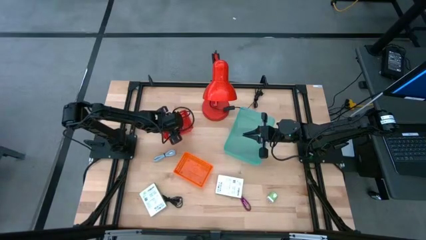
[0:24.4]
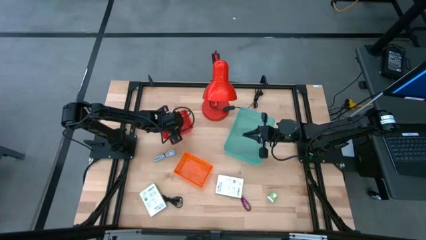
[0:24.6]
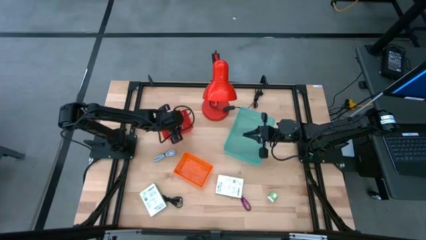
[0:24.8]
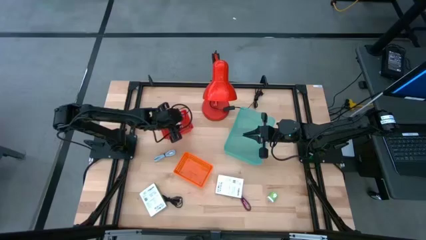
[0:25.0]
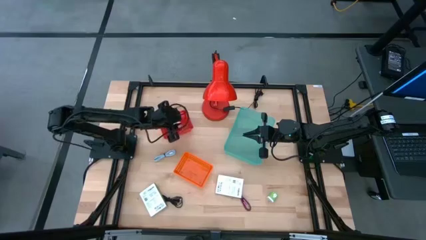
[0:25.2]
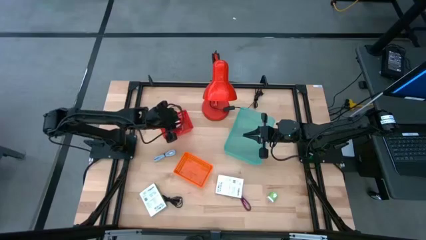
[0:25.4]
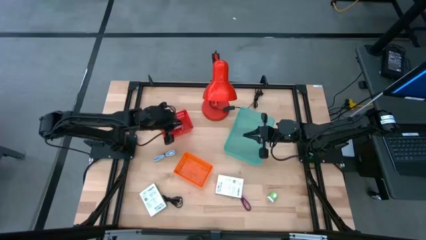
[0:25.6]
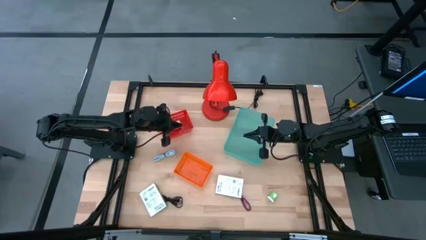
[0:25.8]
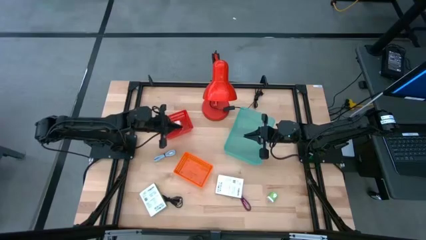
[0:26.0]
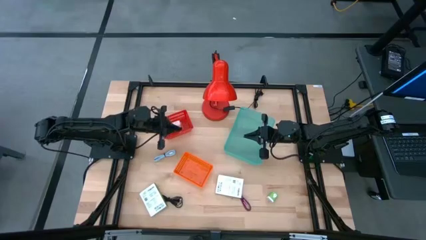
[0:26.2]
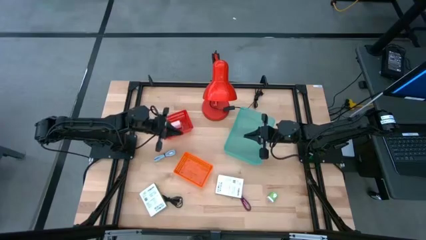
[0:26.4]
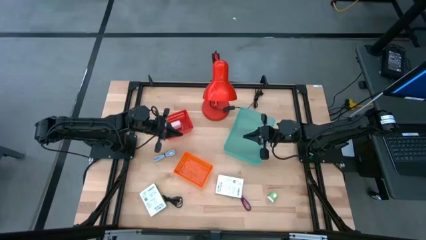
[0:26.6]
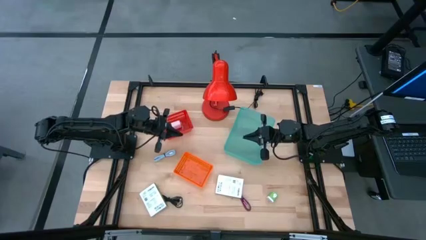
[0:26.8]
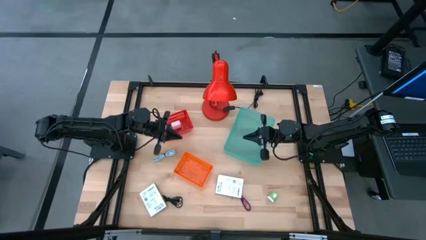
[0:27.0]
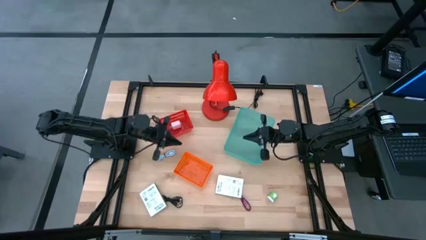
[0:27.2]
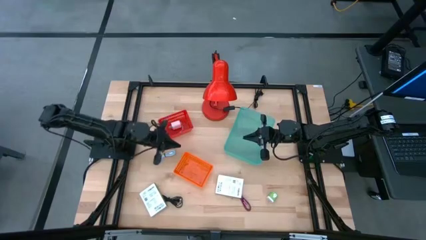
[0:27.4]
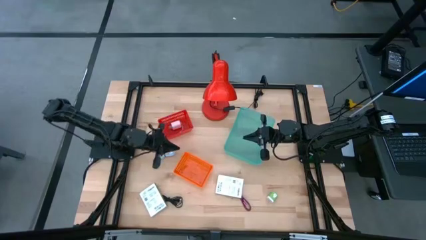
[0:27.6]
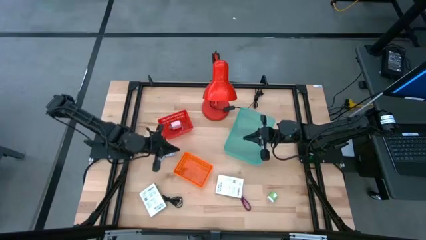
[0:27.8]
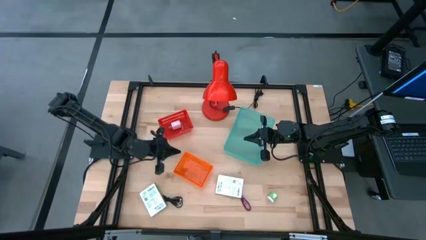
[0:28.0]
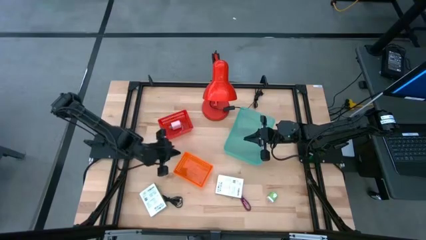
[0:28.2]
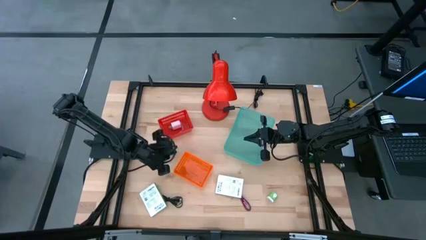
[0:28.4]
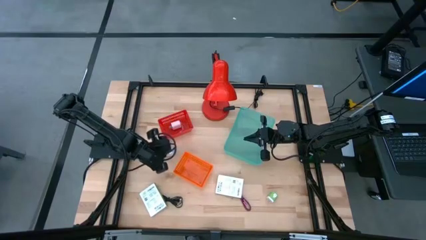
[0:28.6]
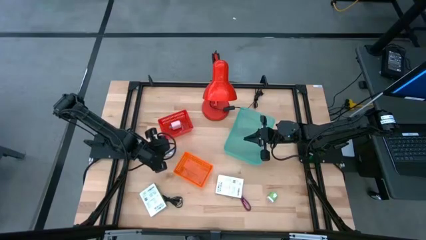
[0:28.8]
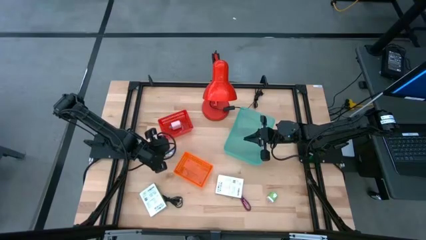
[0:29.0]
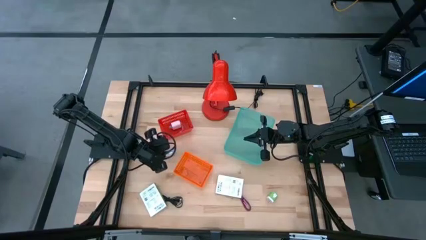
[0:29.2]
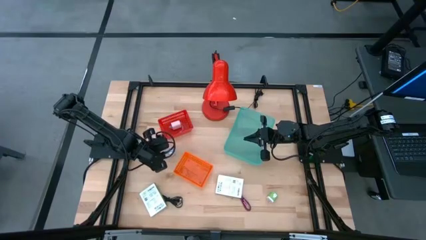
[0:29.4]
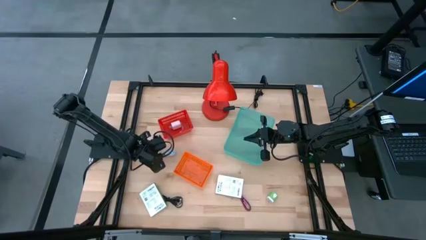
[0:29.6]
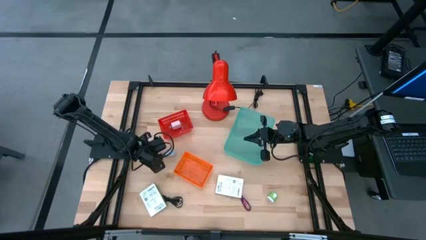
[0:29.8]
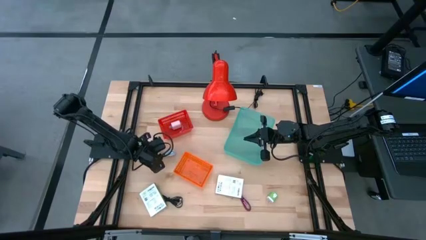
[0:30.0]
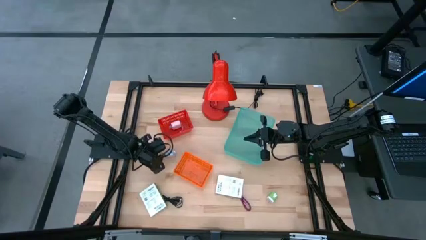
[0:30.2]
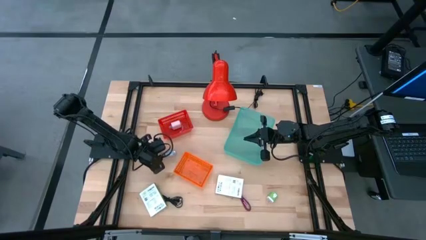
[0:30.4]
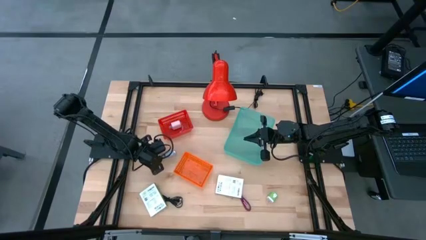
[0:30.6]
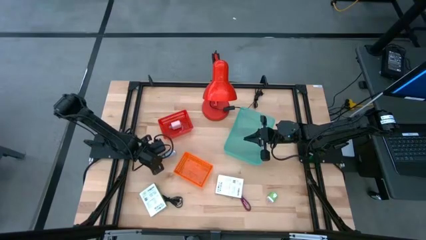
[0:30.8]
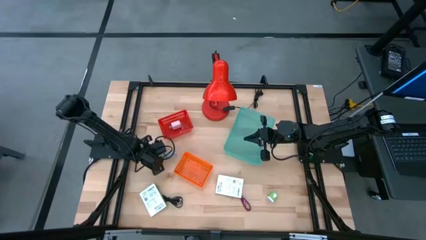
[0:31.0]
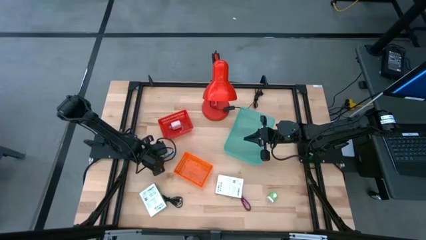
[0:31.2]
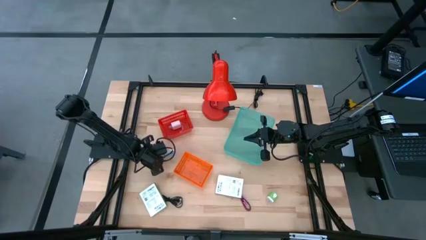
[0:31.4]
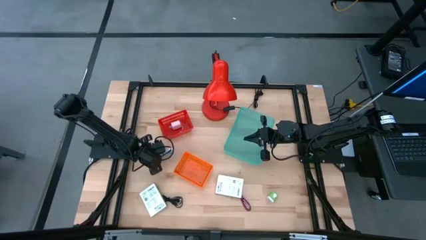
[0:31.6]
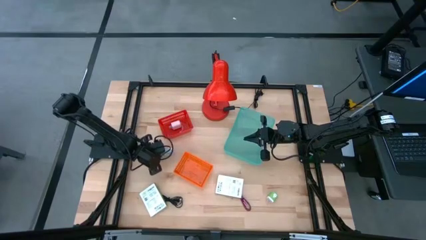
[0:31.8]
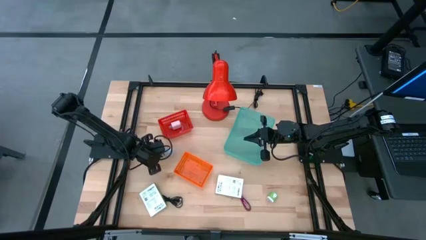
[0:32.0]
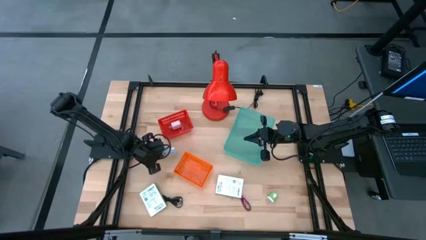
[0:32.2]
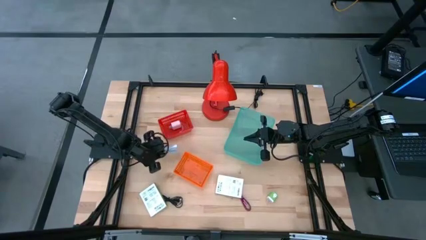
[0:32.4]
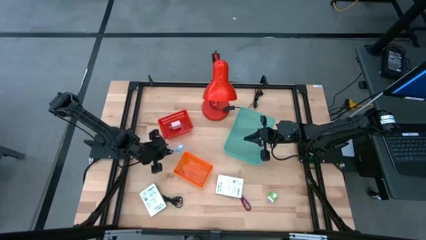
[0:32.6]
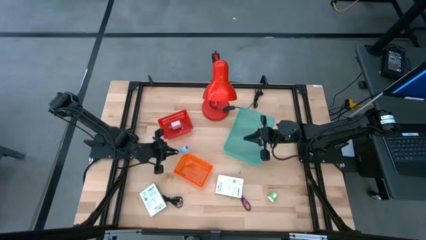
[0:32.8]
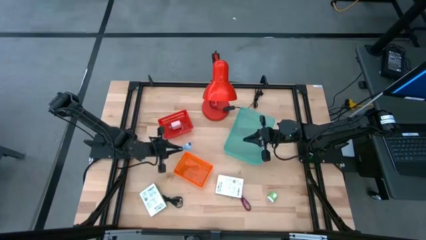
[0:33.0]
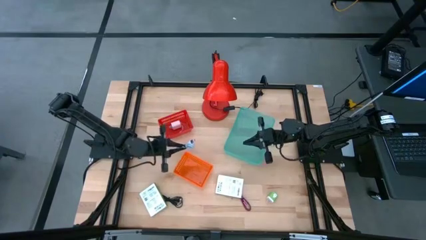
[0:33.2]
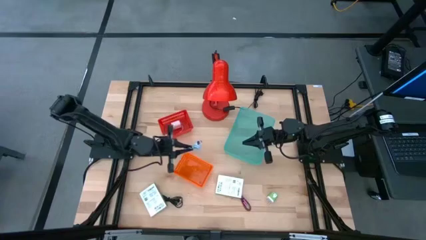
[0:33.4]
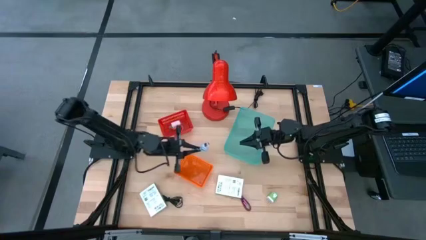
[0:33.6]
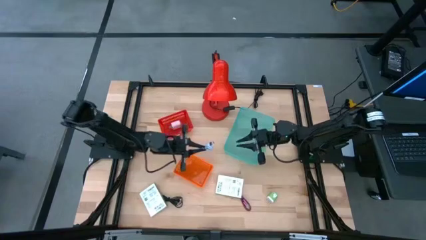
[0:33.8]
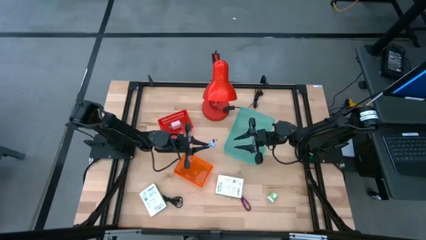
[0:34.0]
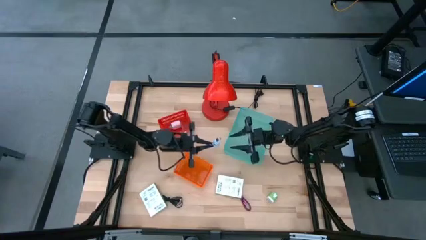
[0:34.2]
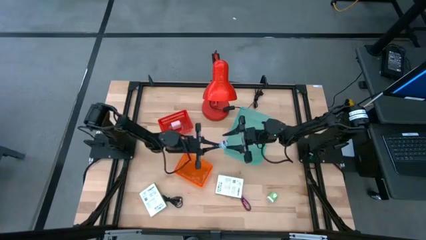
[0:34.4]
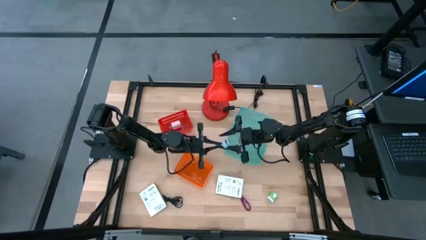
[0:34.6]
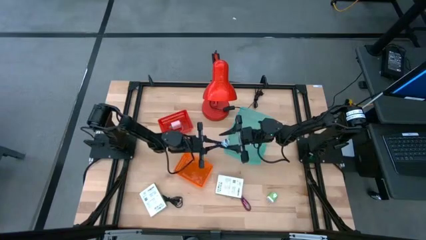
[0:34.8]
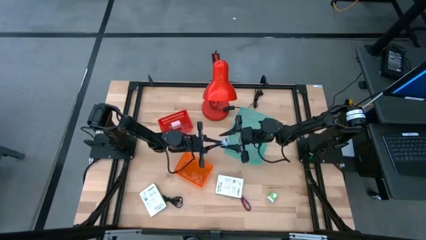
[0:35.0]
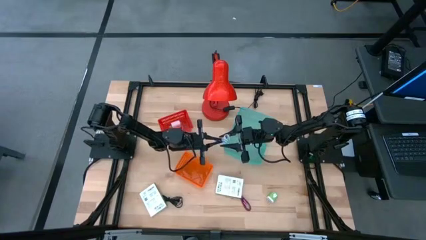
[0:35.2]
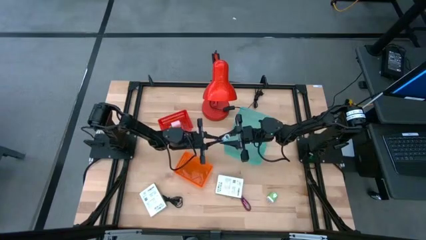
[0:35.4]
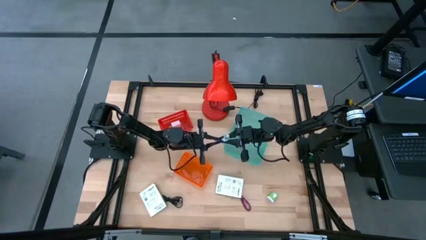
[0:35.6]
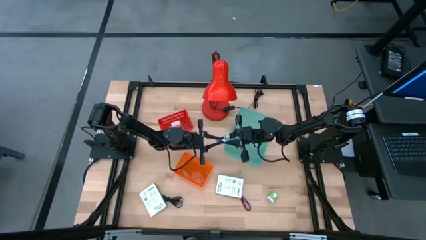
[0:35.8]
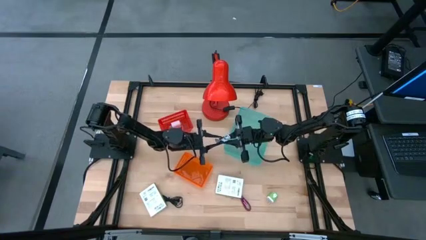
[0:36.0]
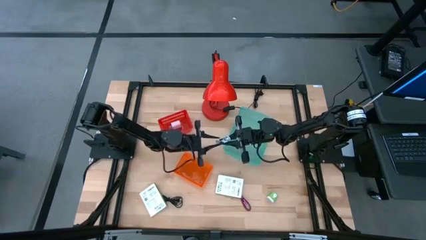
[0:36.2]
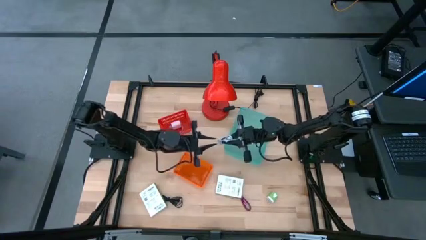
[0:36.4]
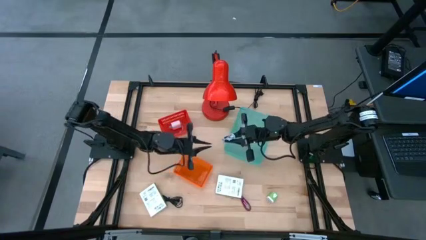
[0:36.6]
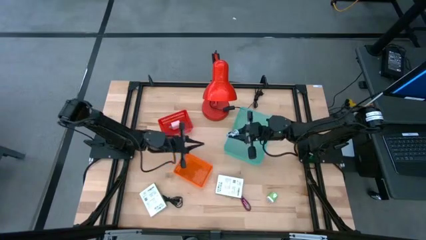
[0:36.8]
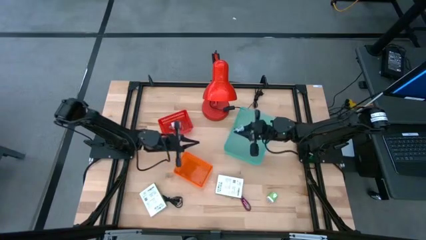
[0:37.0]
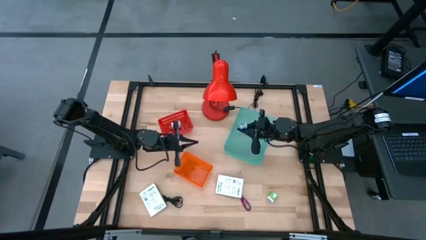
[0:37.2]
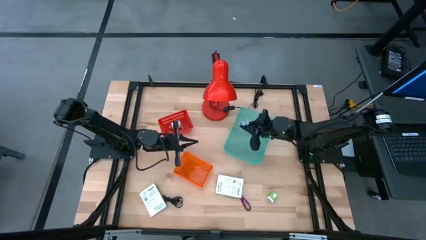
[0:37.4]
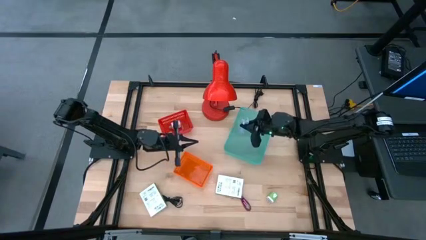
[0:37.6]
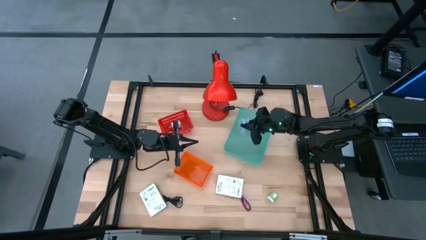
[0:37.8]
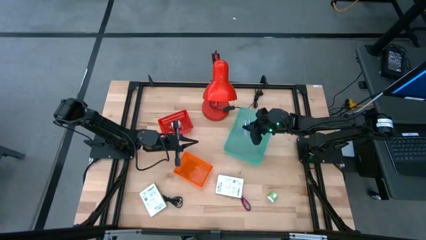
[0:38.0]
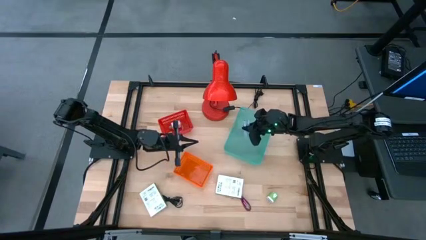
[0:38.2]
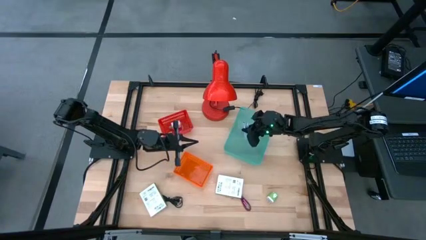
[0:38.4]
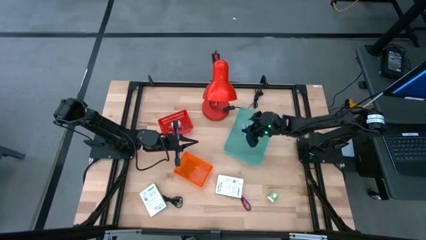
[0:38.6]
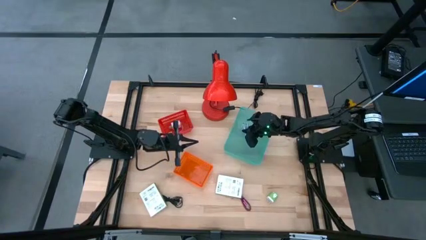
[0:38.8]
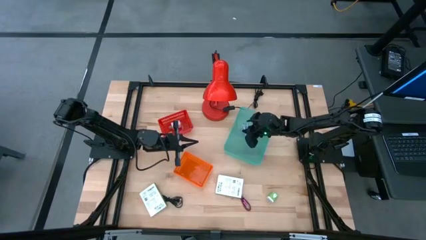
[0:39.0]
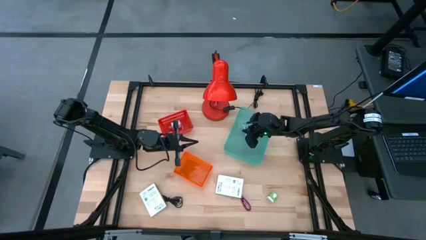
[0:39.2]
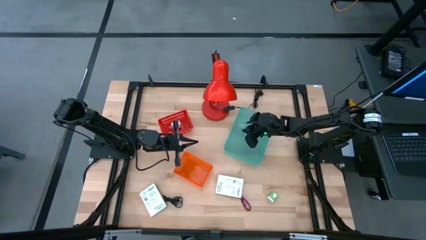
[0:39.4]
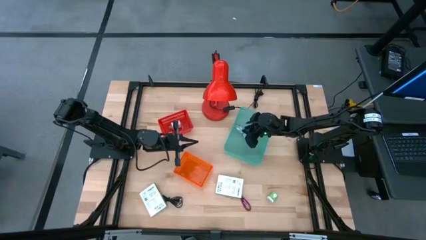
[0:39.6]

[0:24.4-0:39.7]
Task: Pick and place items into bin
Put the blue charger cable into the blue bin
